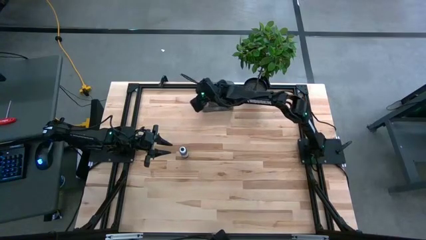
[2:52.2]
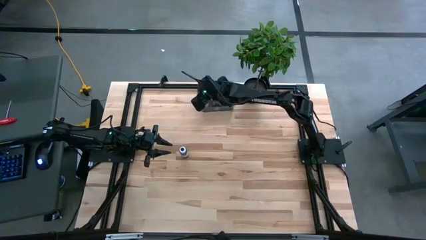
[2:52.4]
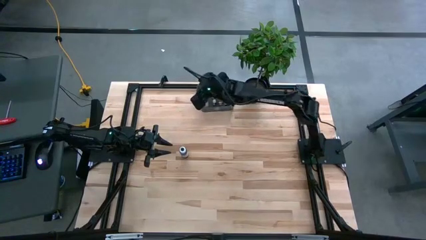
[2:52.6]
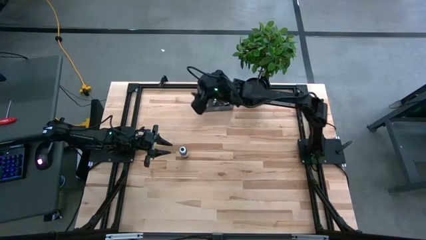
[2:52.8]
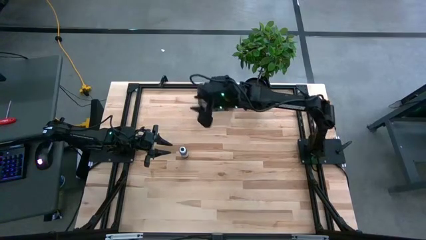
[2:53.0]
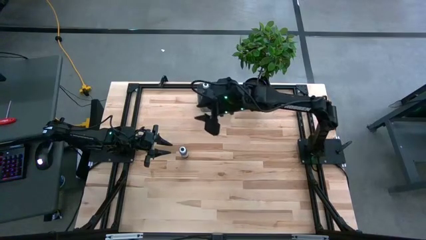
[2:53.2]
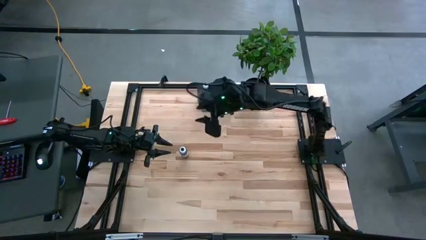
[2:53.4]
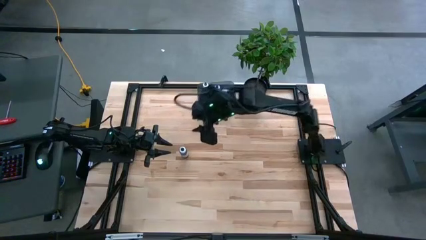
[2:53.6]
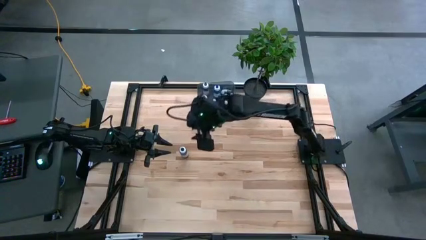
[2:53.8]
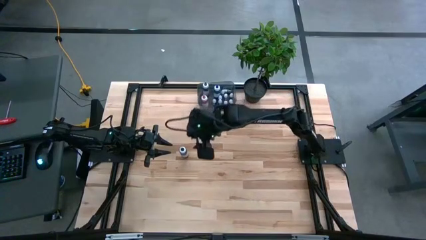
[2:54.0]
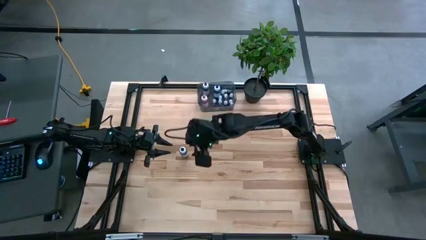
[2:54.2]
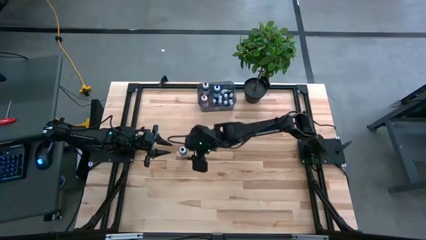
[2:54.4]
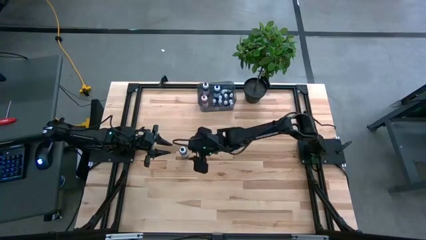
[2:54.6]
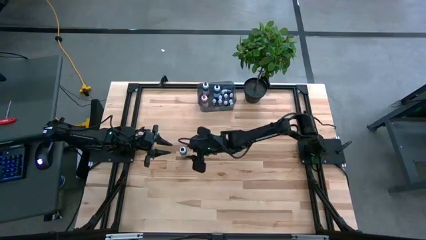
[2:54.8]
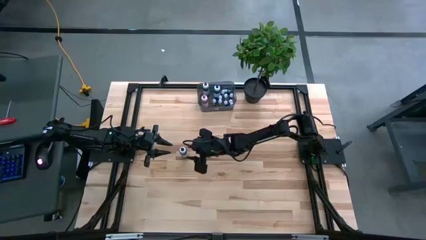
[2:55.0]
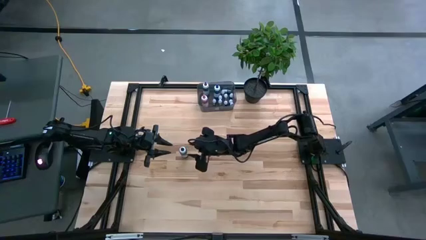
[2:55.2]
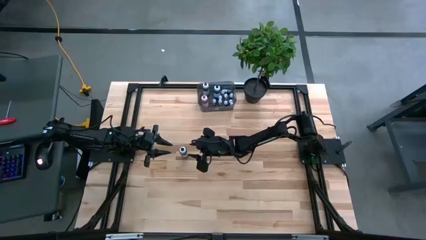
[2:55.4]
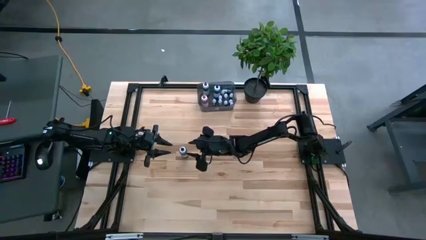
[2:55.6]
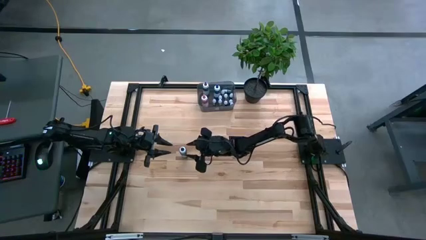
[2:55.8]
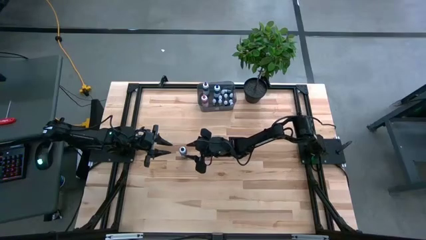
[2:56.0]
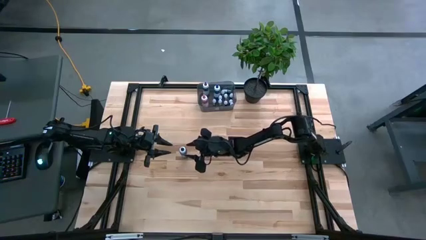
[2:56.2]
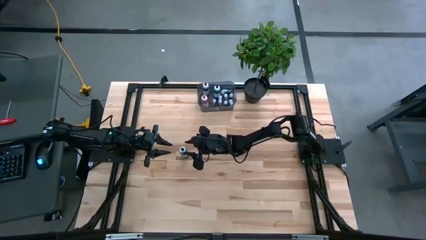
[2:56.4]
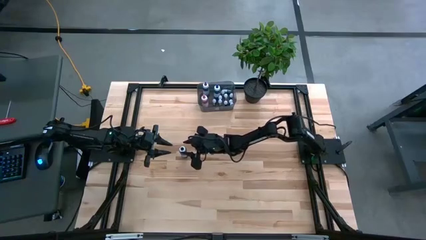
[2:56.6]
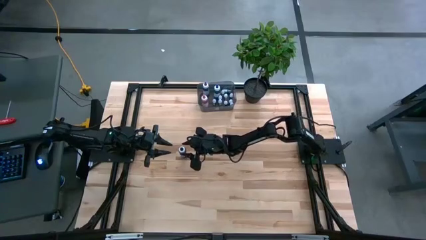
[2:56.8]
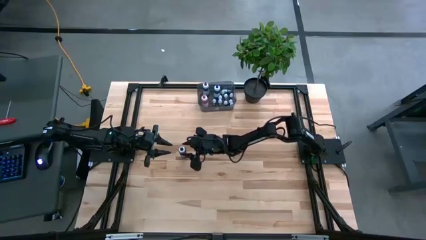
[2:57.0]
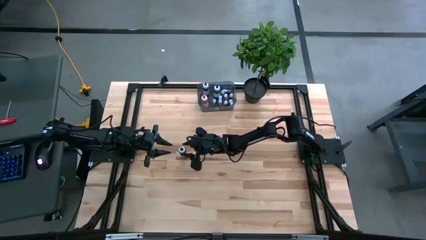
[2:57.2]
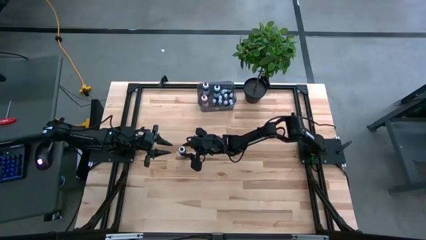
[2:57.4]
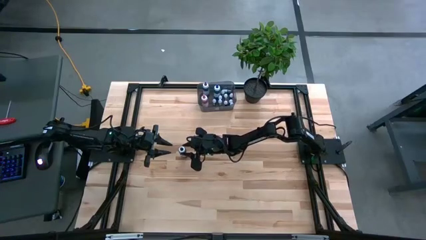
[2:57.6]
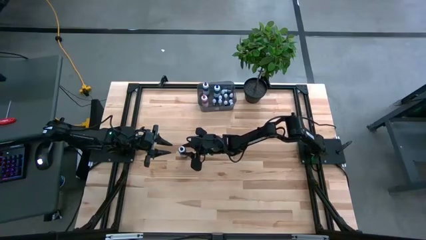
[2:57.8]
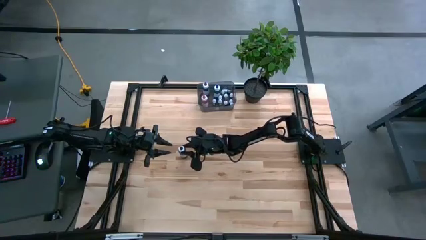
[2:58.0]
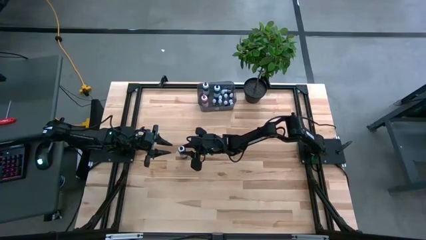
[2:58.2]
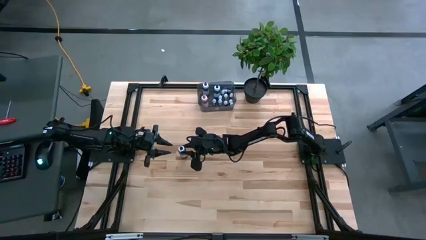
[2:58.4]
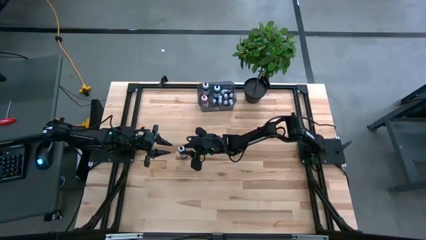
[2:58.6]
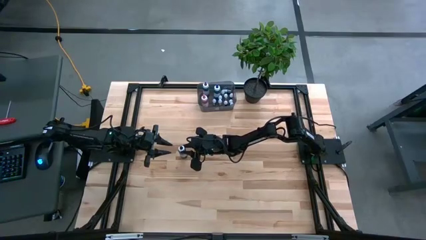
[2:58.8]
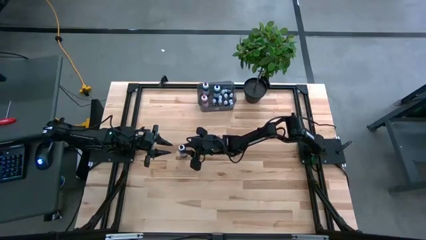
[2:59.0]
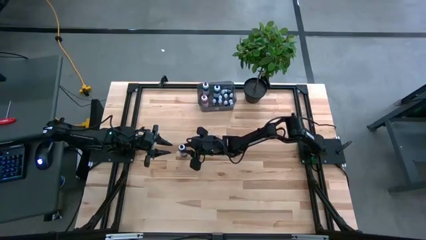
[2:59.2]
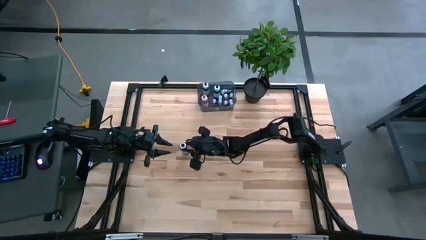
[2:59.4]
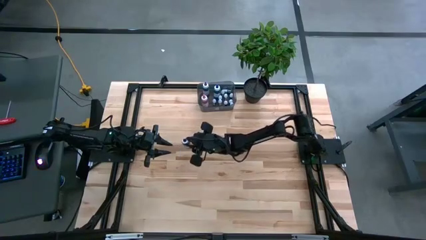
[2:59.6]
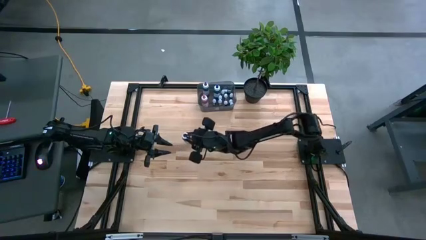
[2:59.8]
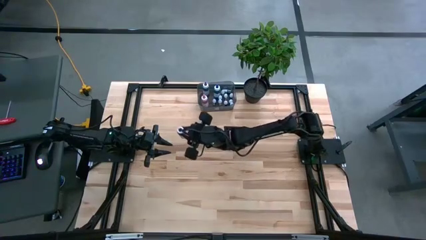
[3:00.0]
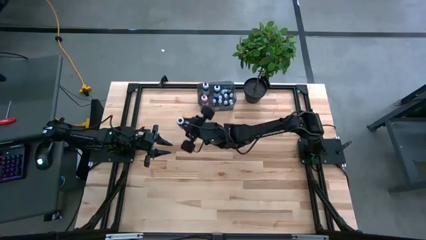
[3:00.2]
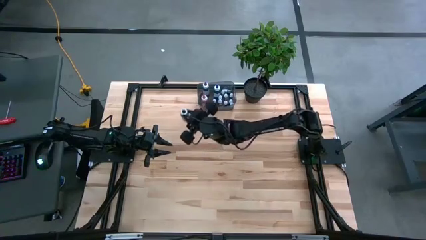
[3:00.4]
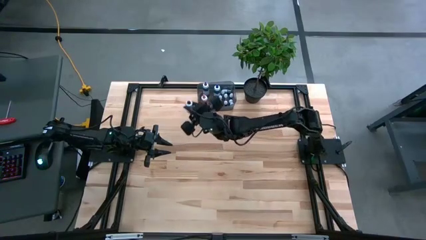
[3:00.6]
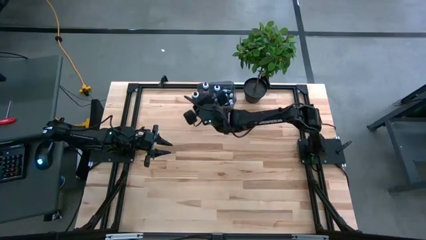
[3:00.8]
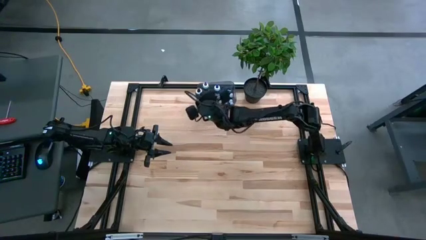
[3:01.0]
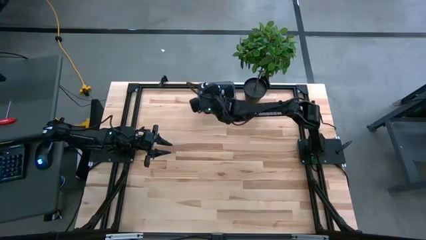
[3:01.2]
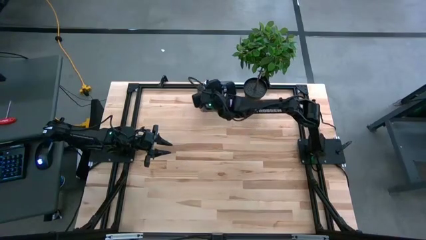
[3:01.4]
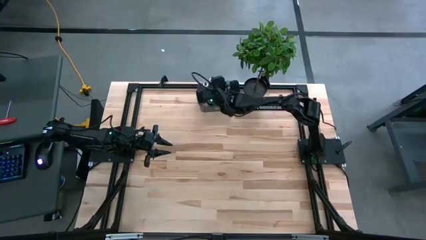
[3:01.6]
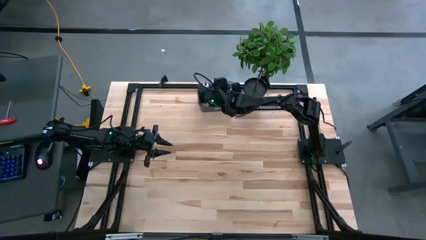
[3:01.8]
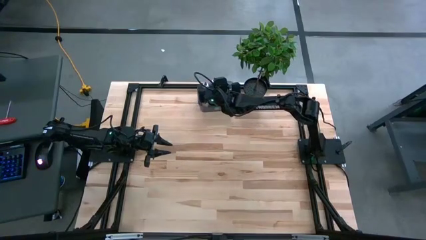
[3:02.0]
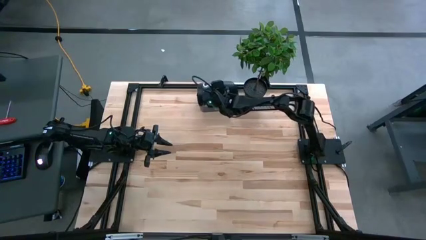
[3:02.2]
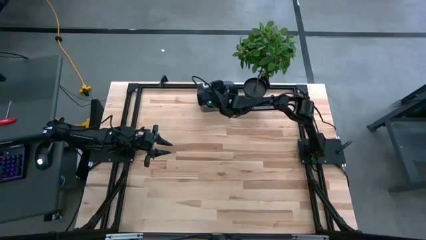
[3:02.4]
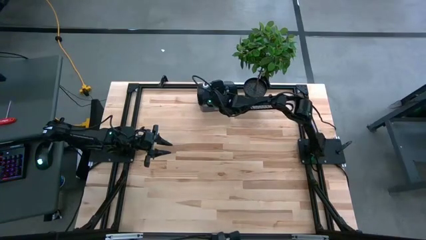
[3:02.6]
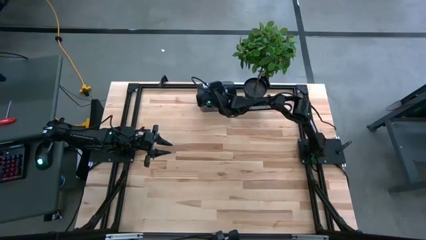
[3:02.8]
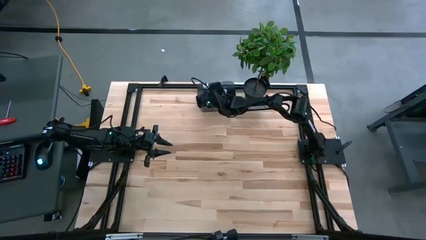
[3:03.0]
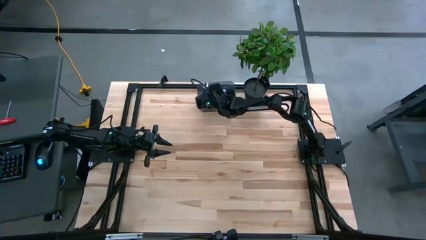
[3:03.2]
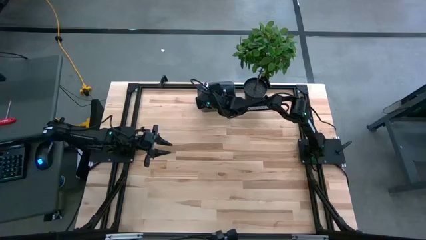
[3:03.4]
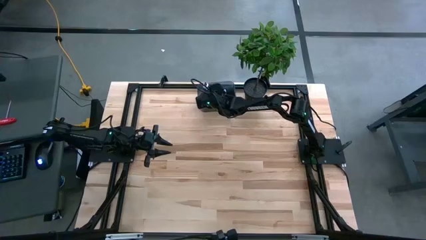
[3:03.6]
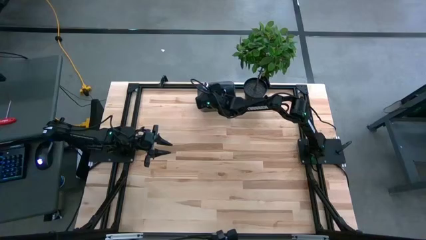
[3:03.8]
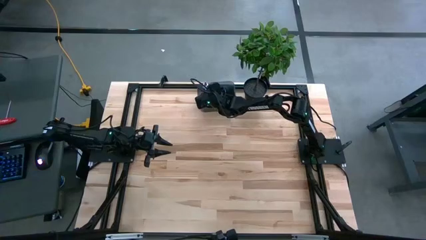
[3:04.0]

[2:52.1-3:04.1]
Task: Pick & Place food coloring
Put the large black food coloring bottle into the black bin

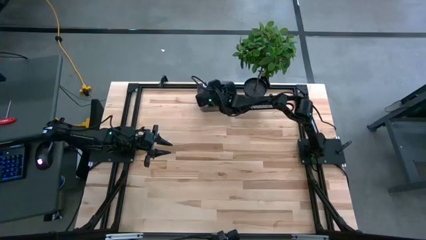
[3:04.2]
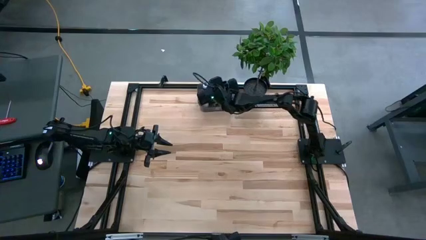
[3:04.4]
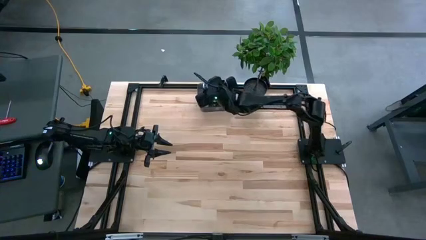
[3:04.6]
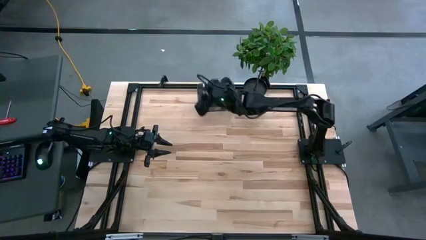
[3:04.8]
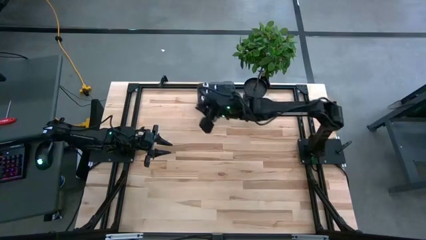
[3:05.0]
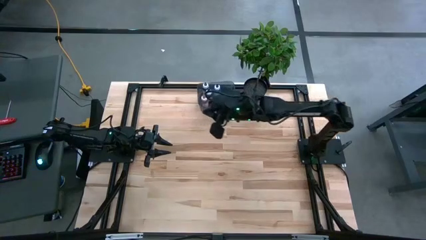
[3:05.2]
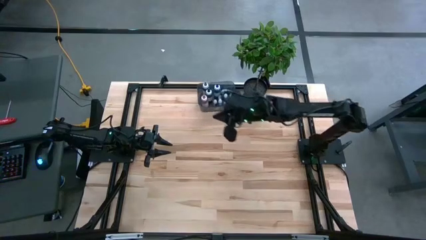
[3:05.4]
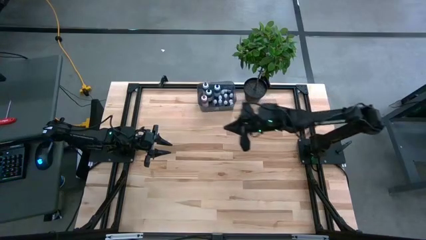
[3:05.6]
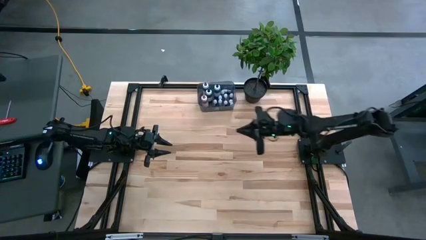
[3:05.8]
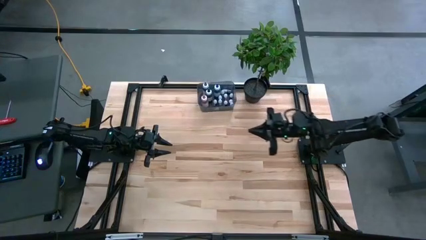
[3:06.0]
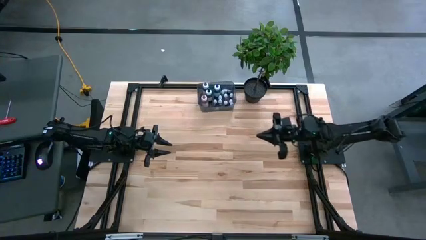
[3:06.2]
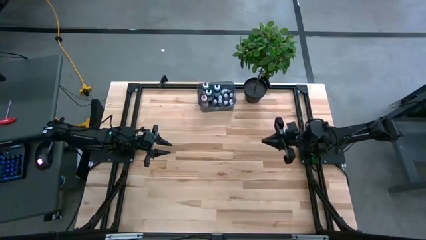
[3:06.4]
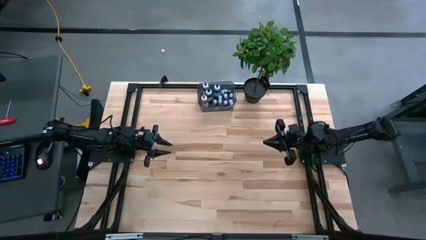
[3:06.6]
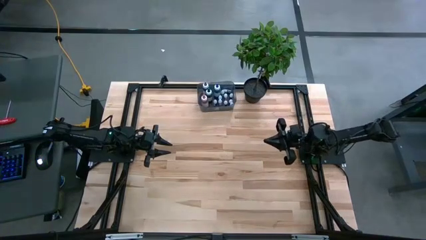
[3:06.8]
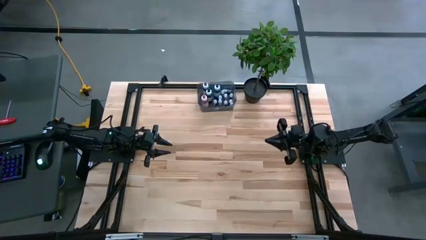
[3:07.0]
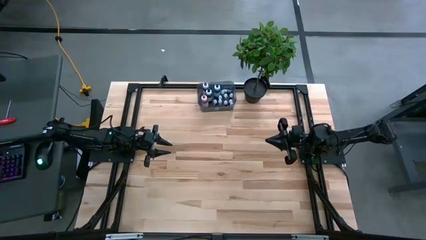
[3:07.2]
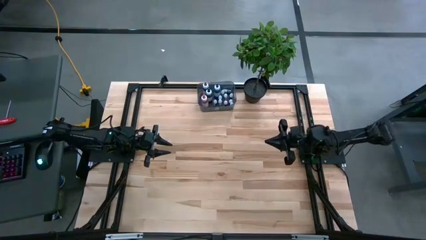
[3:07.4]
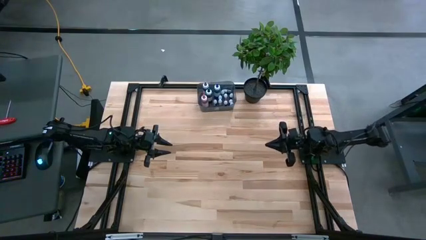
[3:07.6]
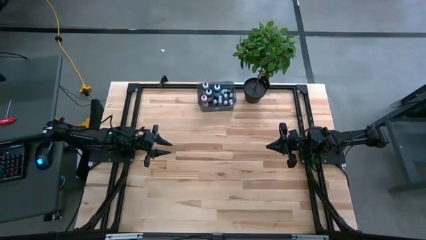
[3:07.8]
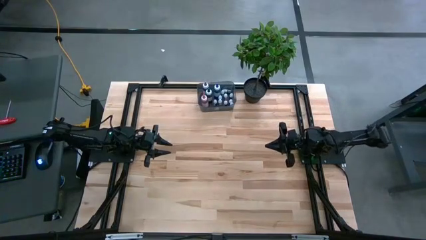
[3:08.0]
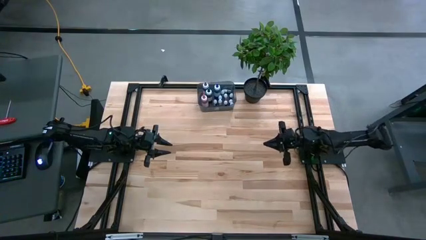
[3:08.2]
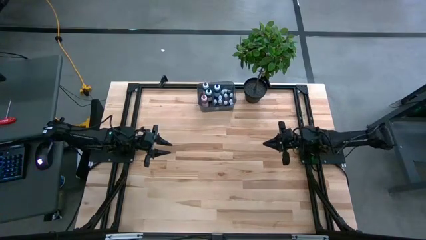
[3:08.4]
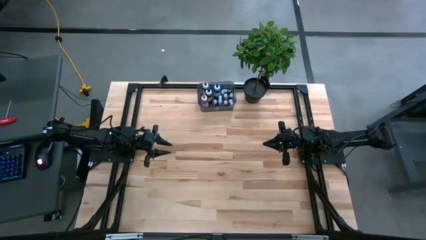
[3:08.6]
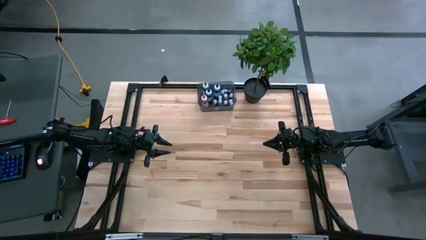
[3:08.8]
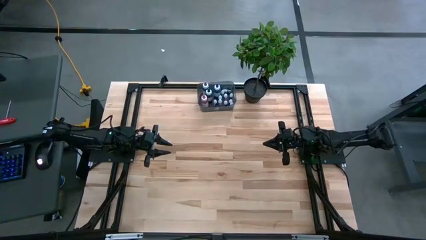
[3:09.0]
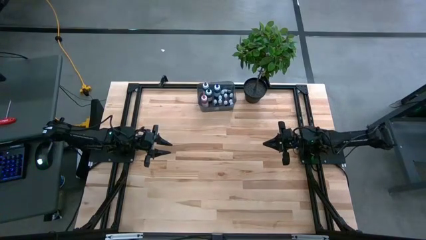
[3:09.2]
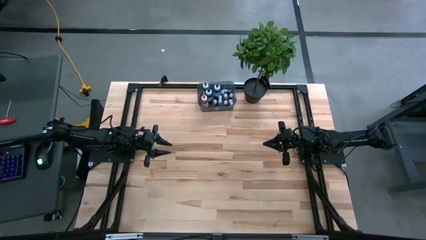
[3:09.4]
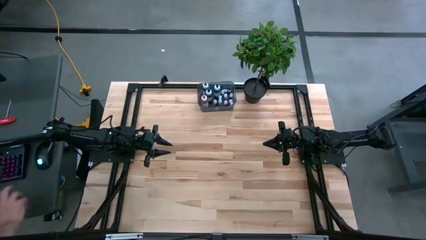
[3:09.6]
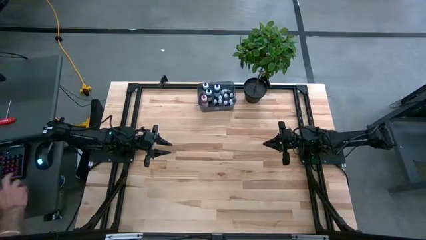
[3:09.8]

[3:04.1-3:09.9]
Return to home position
